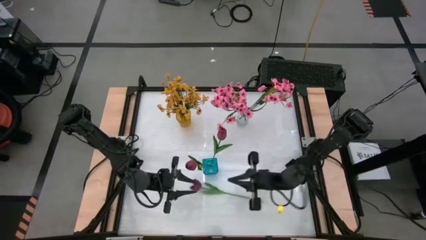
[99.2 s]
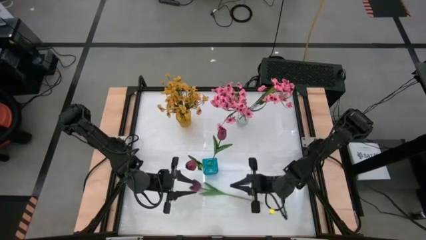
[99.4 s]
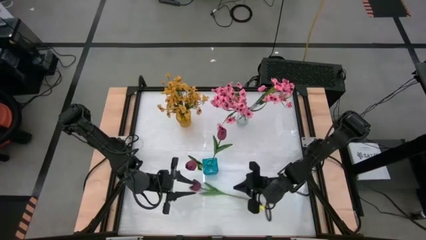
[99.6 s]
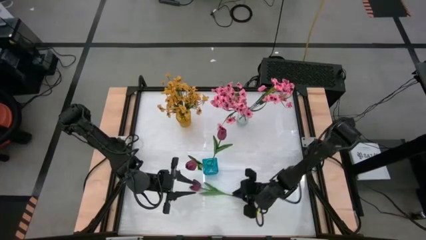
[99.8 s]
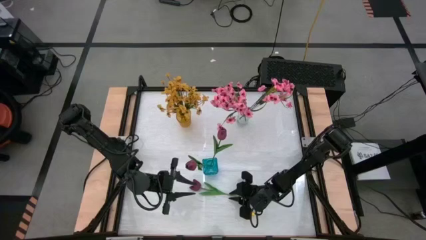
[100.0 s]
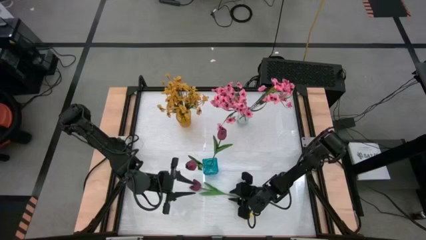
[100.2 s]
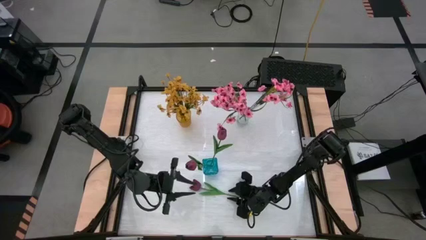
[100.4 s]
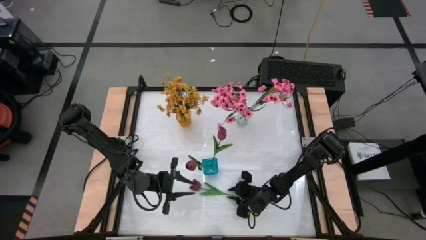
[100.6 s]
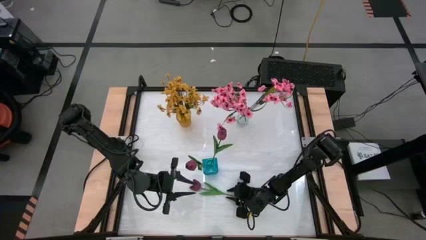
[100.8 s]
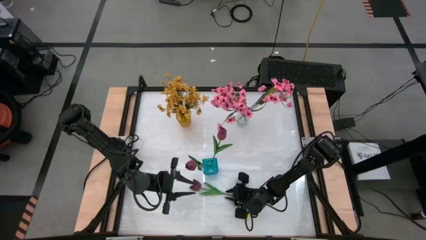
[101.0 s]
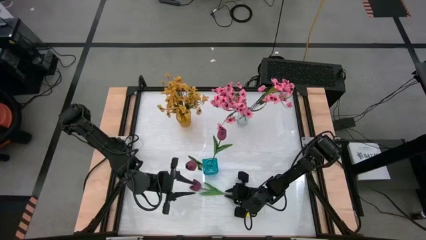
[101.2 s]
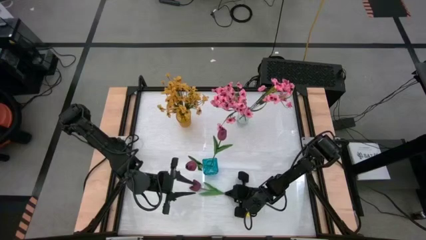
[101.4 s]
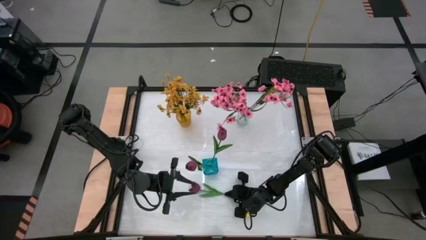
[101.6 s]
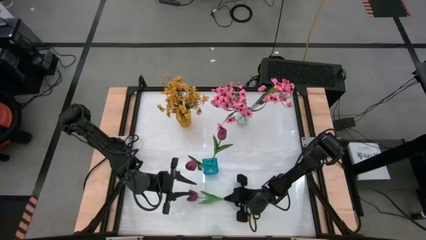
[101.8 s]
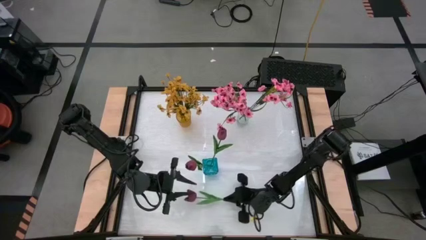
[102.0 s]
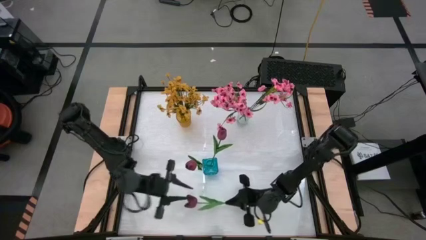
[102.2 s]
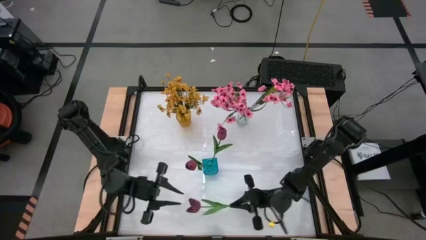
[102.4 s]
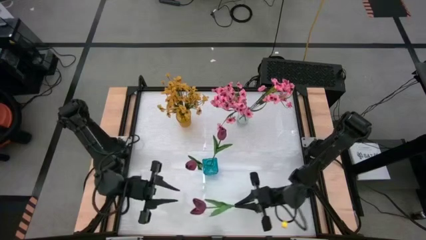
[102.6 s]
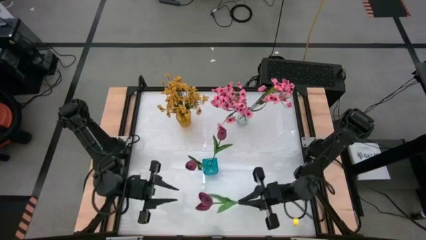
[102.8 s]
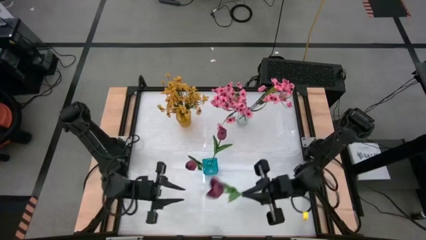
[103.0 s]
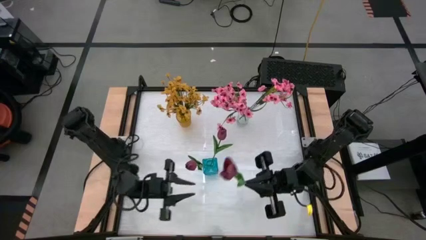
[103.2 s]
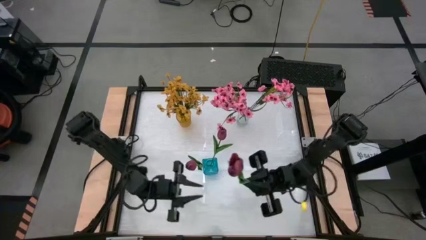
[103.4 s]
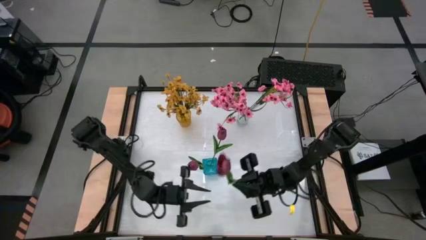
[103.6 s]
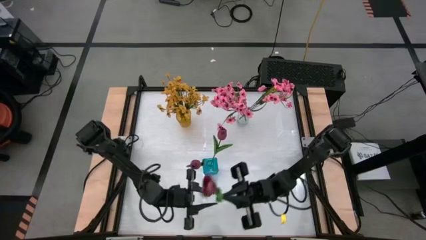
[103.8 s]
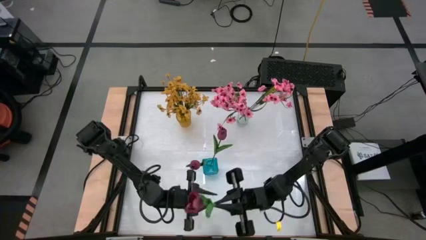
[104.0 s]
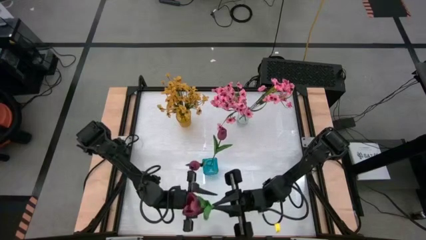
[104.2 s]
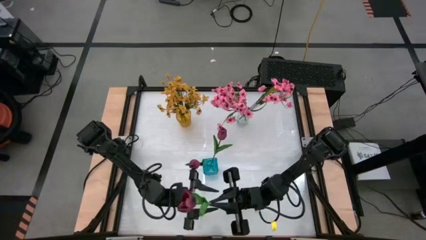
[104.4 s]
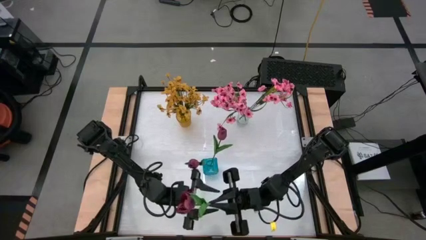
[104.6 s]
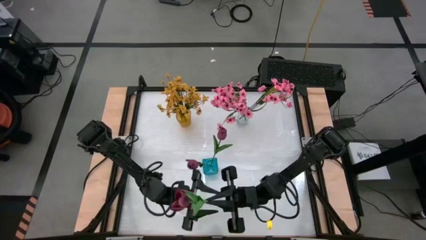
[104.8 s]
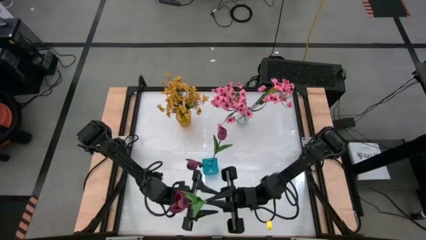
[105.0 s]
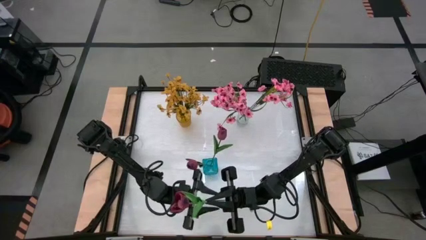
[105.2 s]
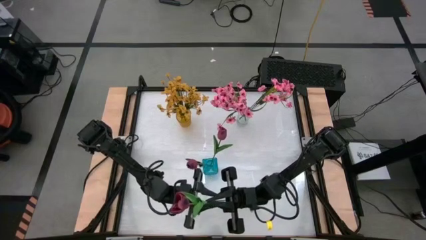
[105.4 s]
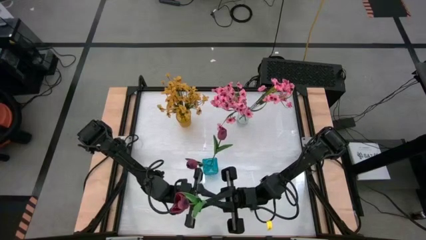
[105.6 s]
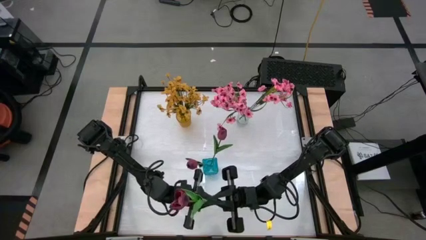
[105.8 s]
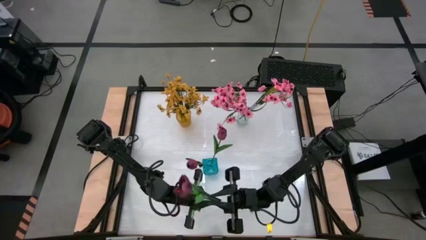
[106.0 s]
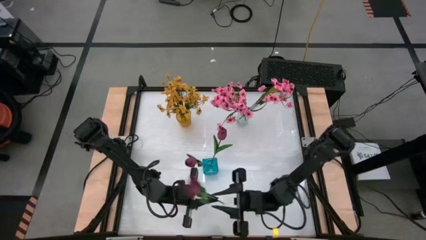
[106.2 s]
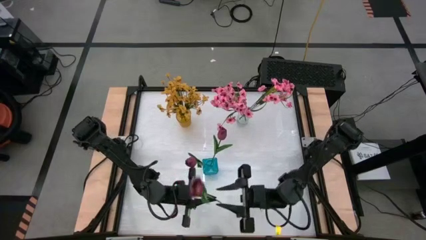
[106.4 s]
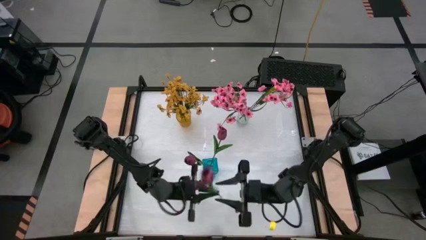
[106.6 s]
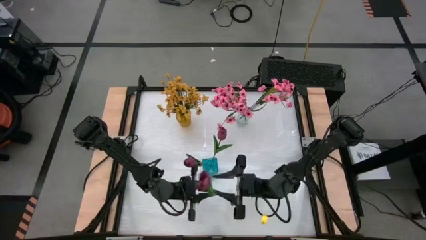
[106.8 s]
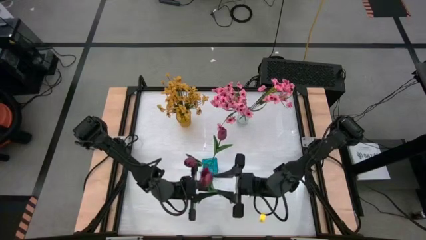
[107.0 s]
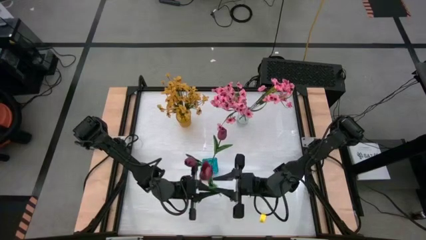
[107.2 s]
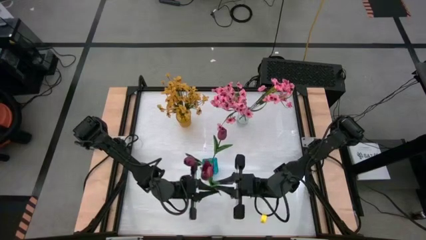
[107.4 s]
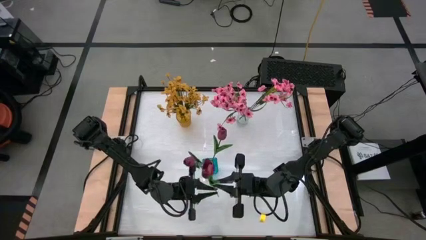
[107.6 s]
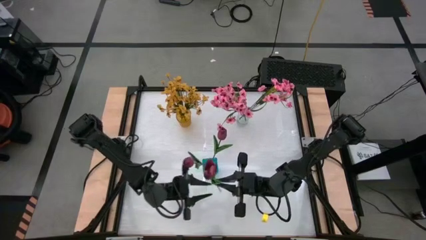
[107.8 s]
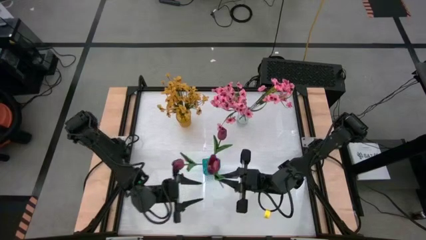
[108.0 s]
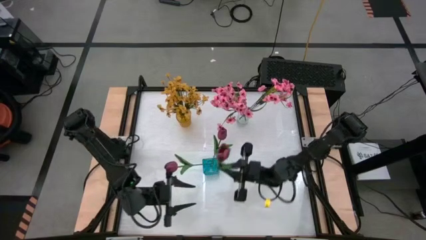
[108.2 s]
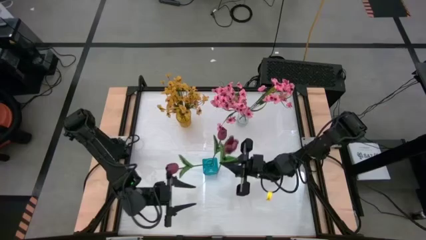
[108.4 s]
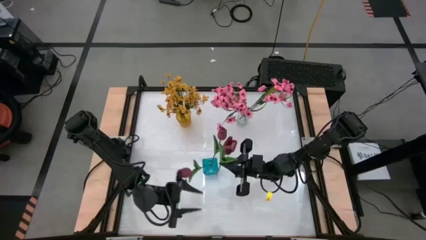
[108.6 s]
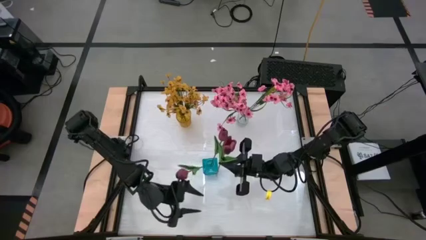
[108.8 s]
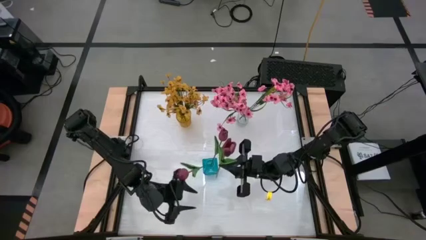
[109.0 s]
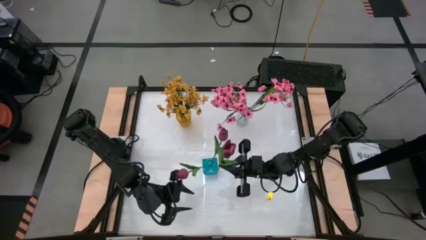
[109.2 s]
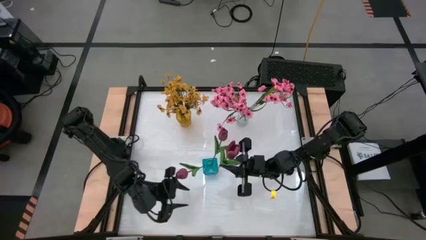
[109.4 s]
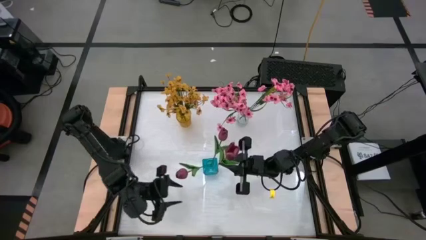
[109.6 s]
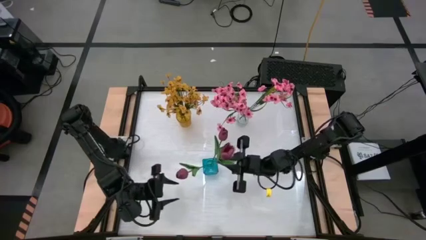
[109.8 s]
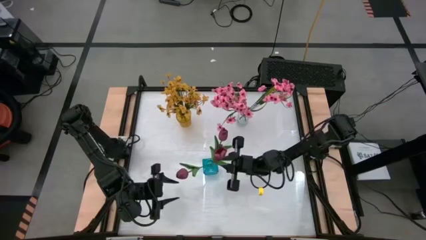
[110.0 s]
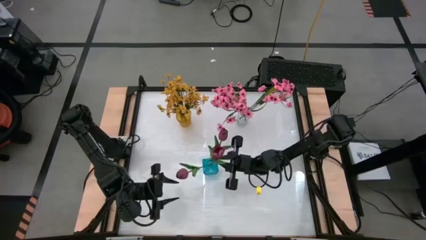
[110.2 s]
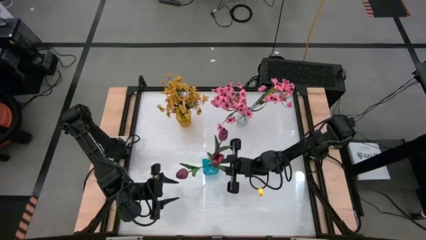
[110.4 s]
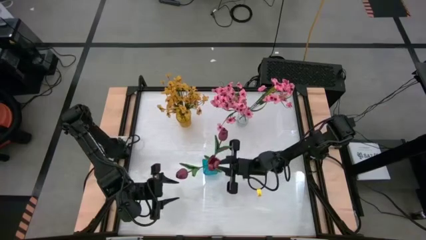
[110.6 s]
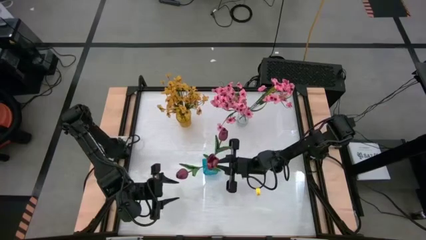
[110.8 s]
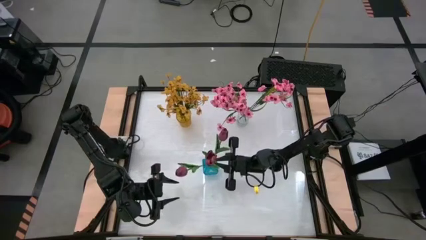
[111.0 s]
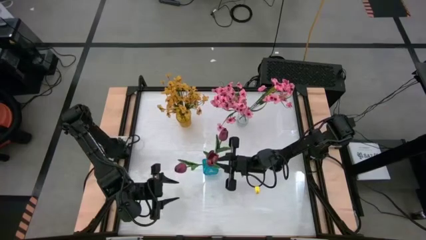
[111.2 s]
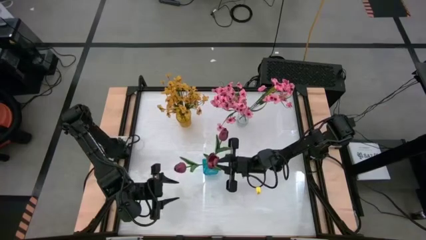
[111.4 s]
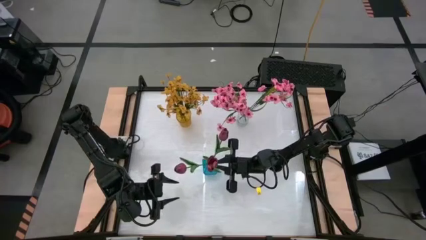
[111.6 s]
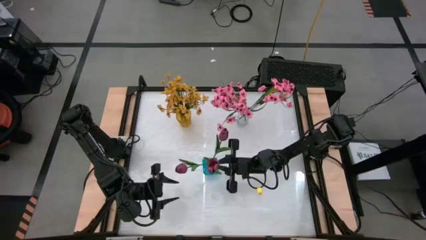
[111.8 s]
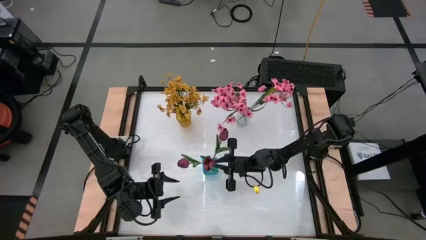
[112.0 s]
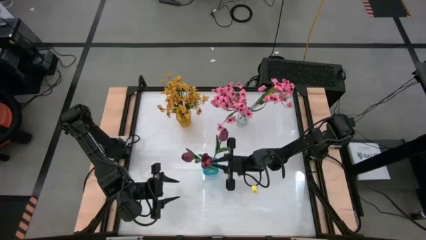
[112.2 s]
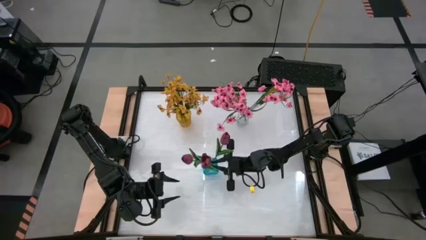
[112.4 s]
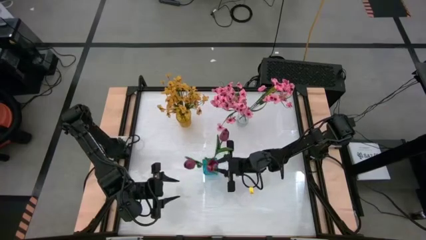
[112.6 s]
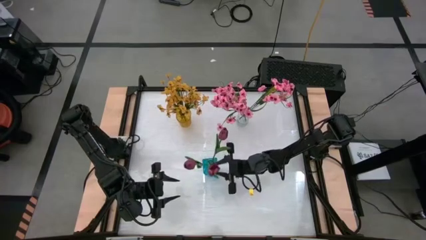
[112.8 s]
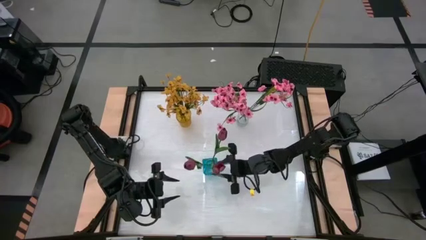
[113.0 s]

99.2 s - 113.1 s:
Task: Sort flowers into vase by color
Put the dark red flower into the blue vase
